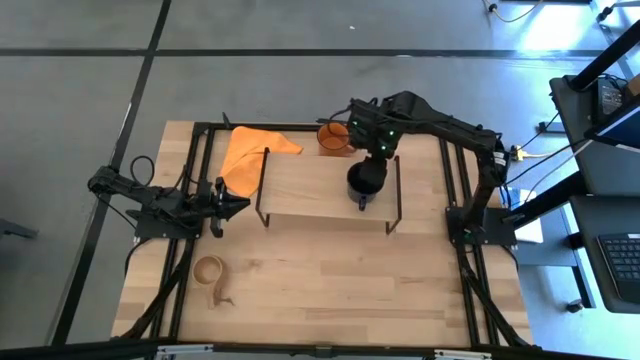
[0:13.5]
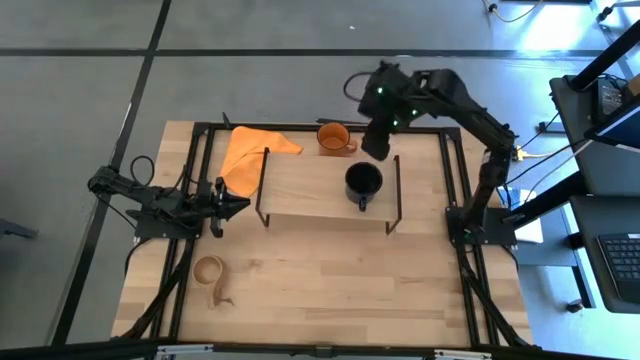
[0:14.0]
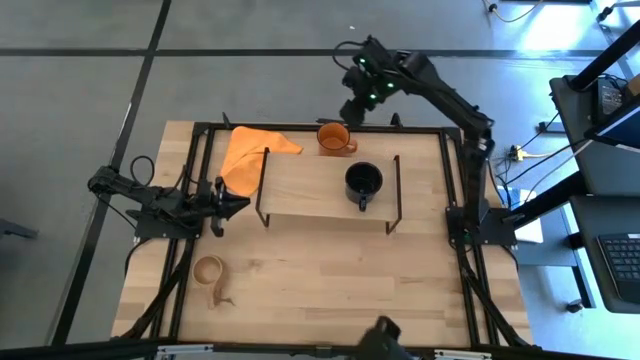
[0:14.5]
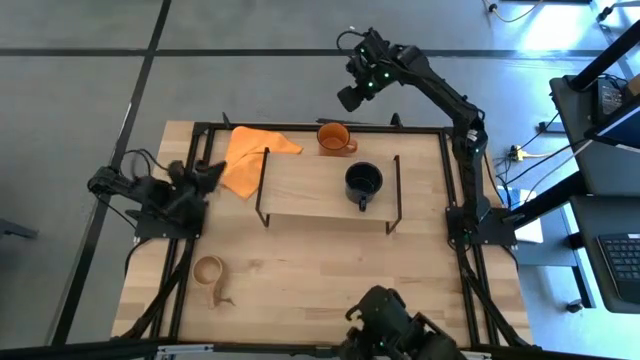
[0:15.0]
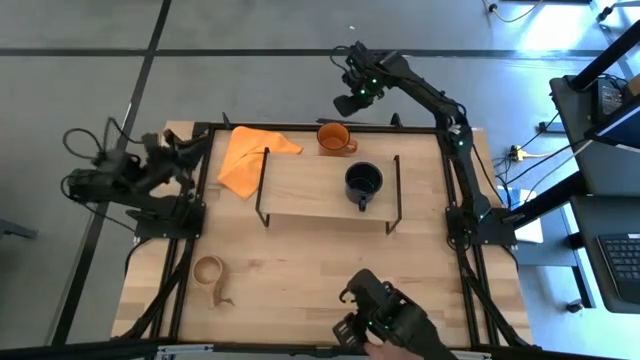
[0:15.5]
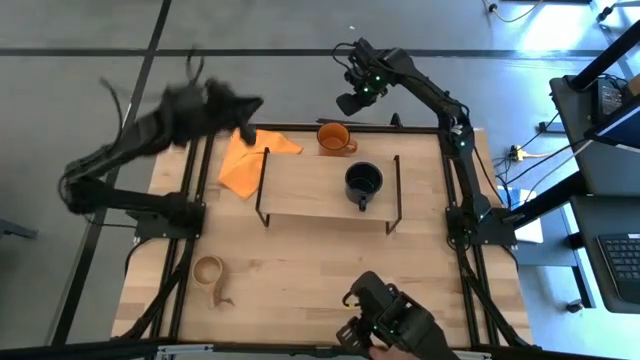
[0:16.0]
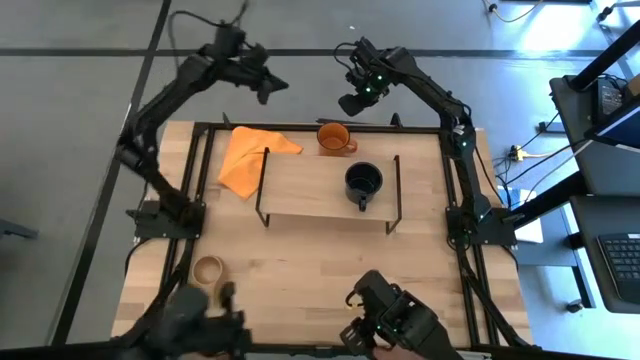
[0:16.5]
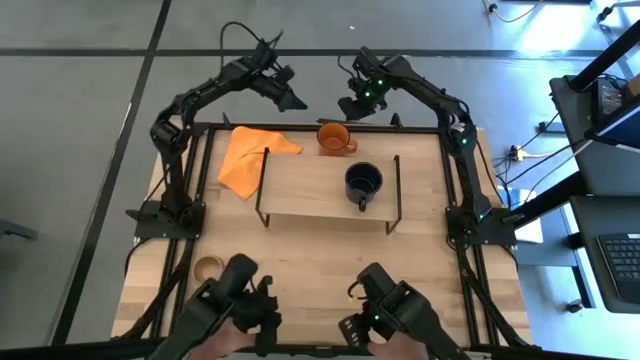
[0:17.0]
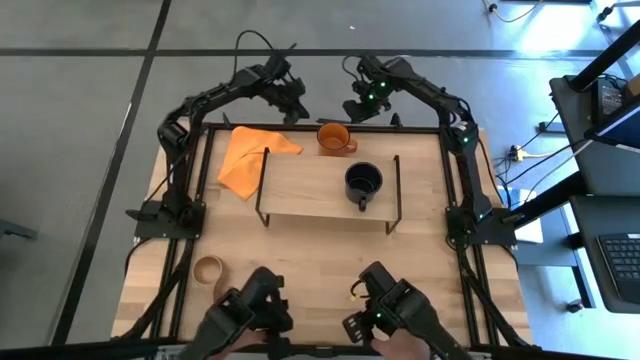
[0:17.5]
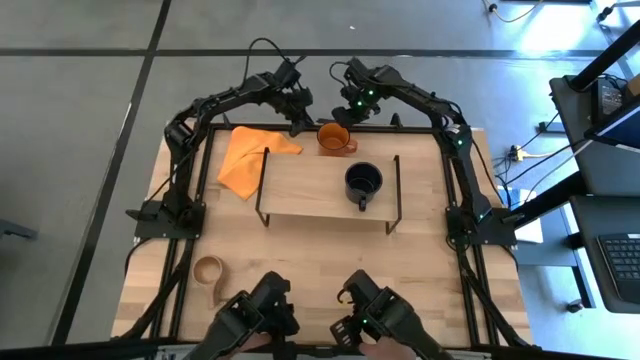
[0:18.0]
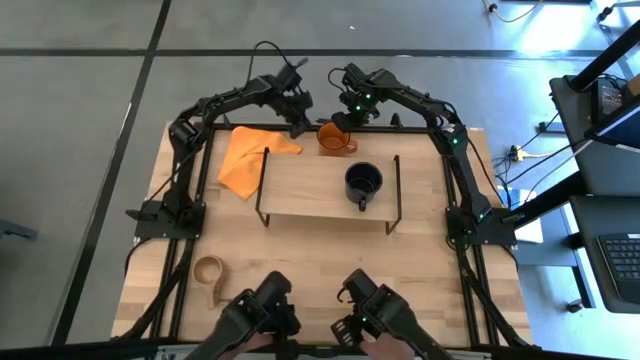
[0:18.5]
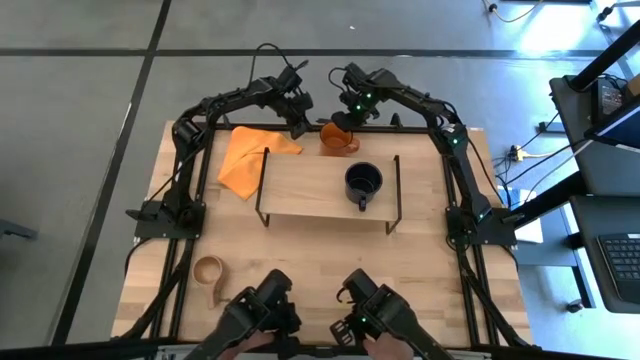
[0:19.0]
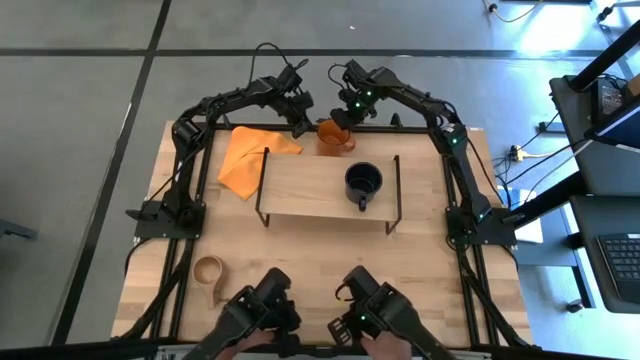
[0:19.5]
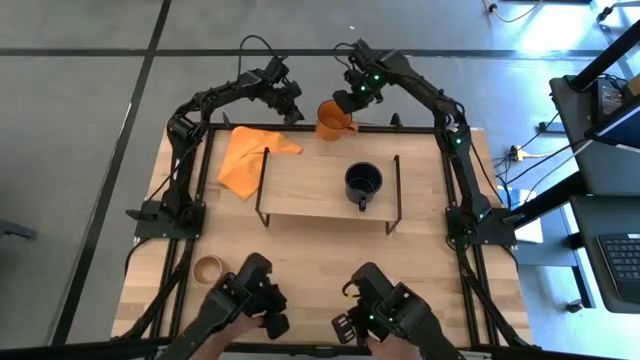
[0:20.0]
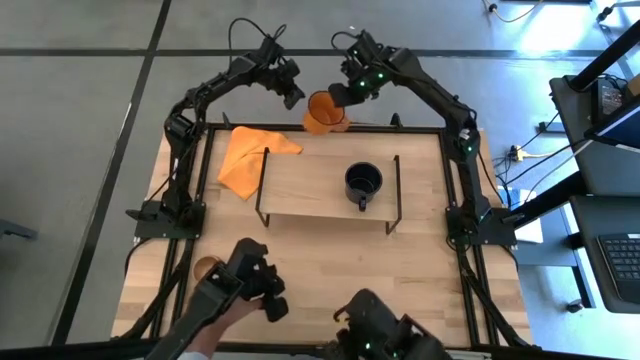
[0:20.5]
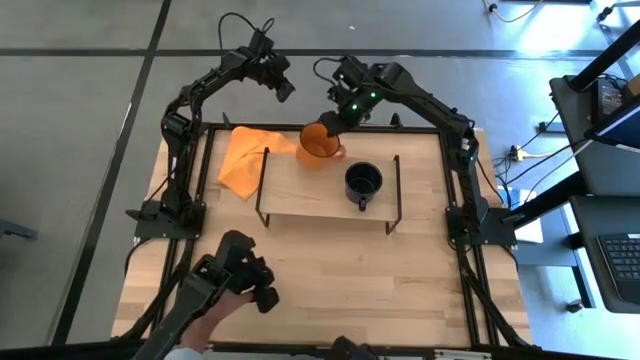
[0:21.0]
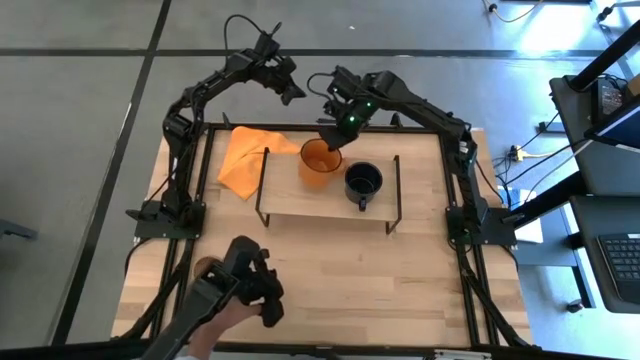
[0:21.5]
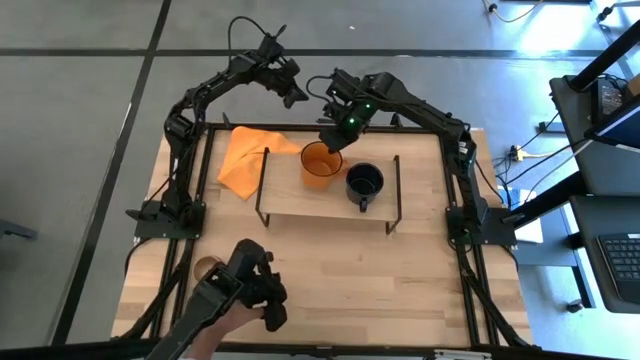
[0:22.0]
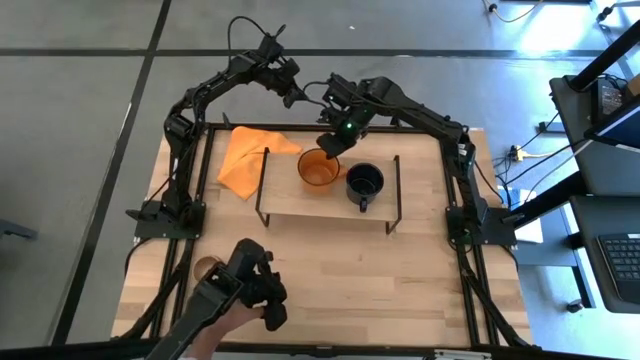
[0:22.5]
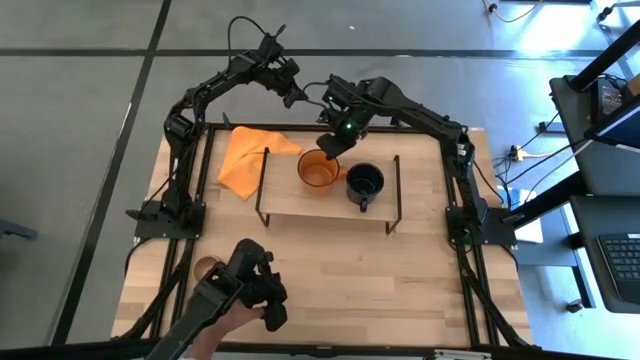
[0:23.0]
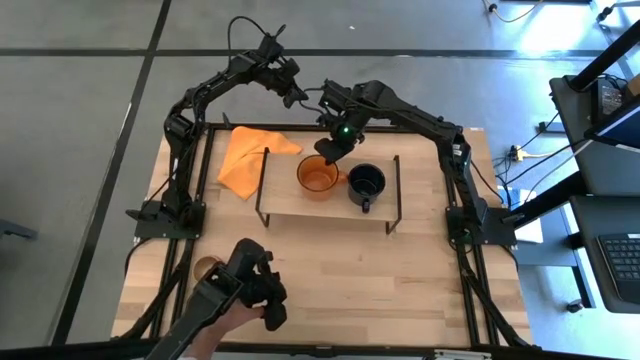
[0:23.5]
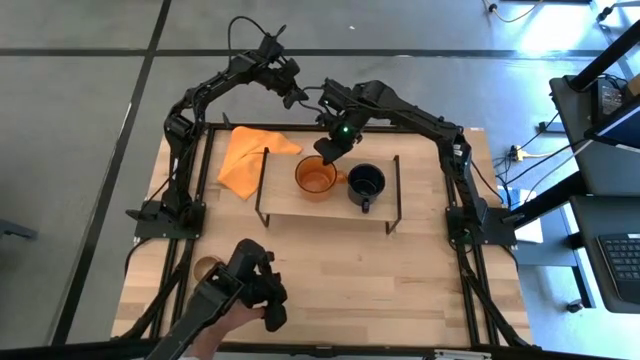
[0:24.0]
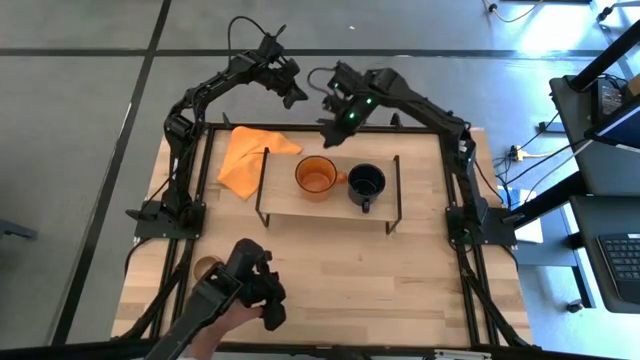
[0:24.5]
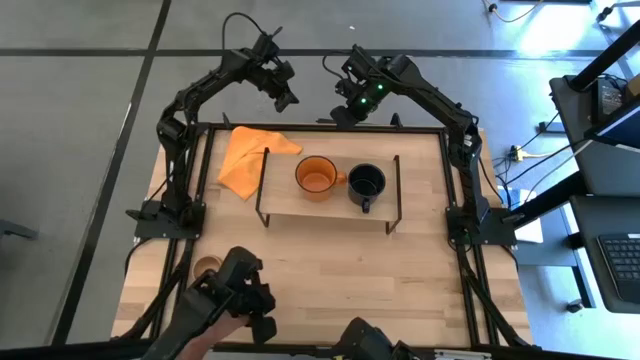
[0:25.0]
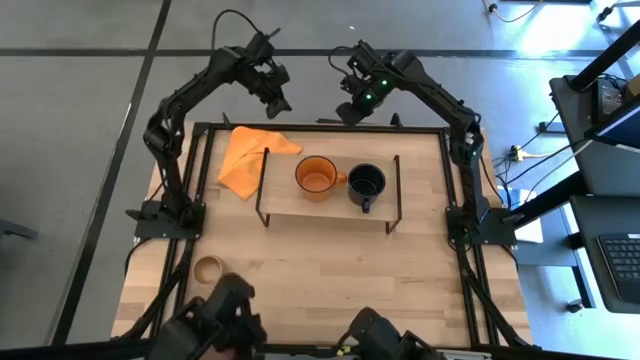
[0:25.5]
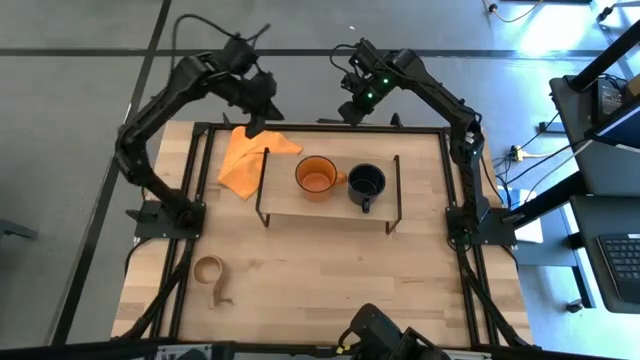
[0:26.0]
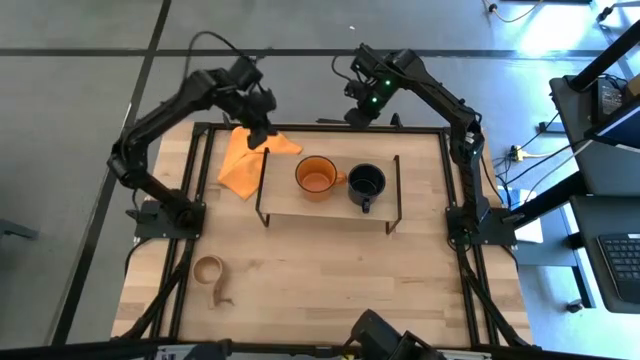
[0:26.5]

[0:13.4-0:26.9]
Task: Stack small to large cups/mugs on shelf
Put the orange mug on the shelf
